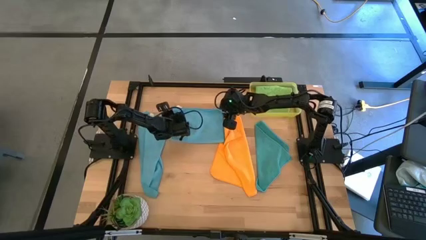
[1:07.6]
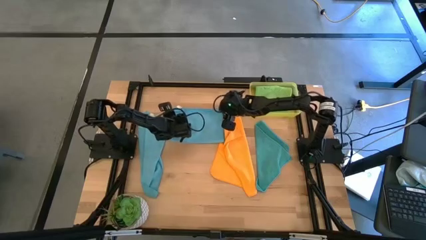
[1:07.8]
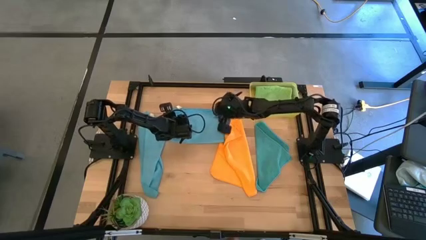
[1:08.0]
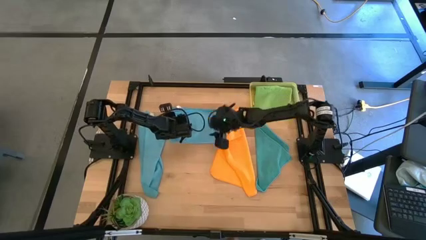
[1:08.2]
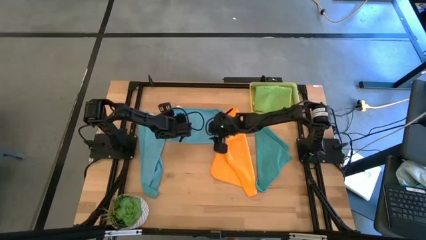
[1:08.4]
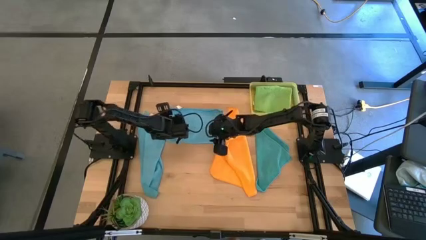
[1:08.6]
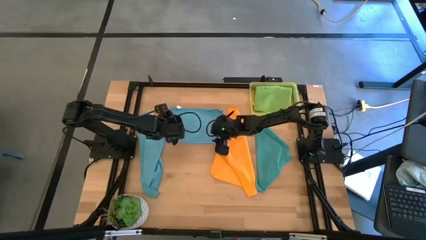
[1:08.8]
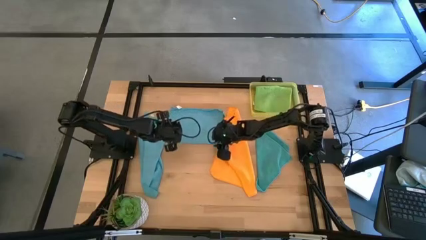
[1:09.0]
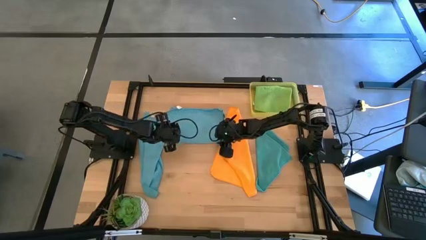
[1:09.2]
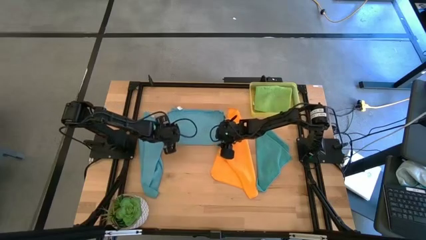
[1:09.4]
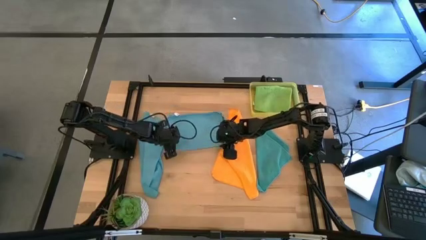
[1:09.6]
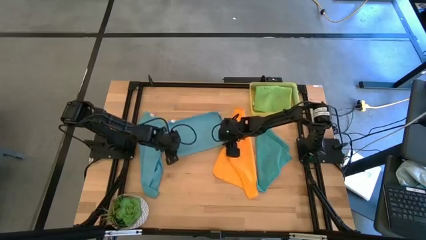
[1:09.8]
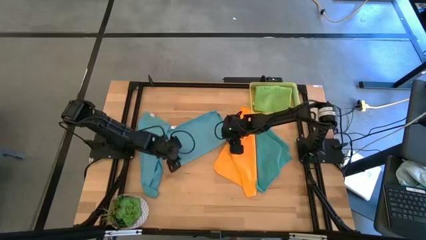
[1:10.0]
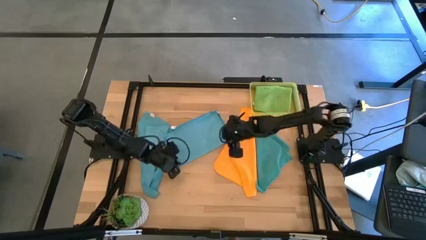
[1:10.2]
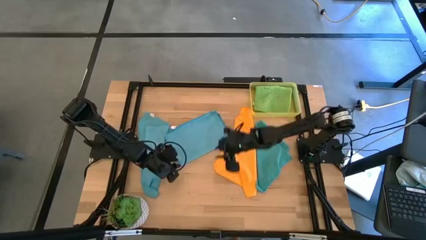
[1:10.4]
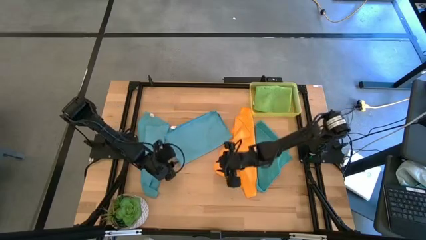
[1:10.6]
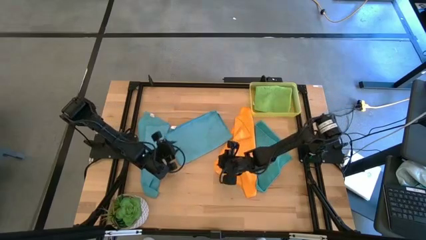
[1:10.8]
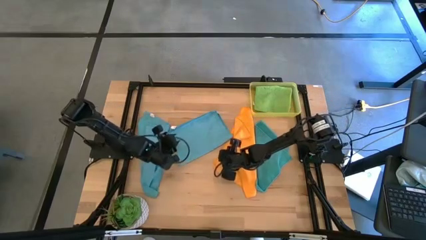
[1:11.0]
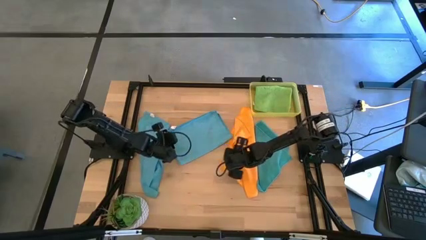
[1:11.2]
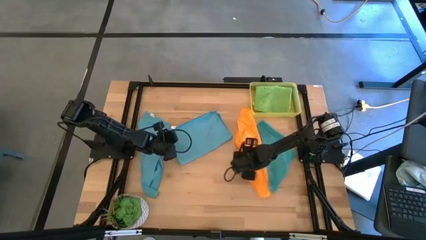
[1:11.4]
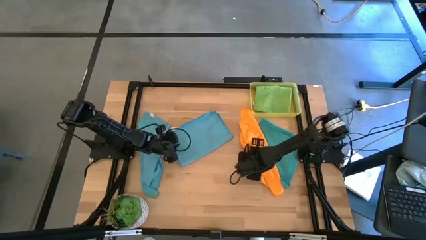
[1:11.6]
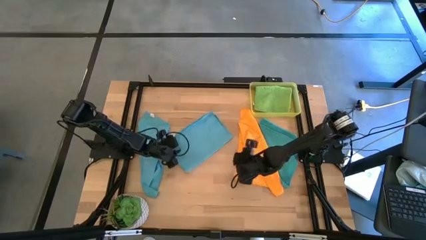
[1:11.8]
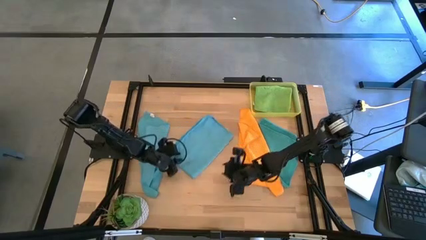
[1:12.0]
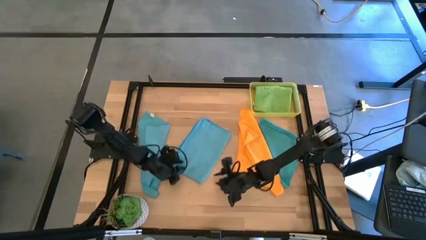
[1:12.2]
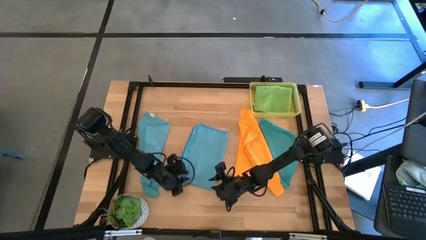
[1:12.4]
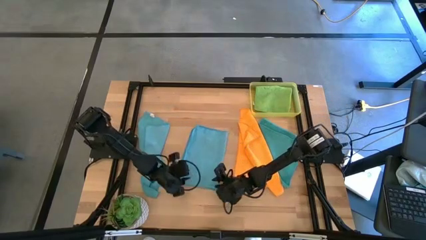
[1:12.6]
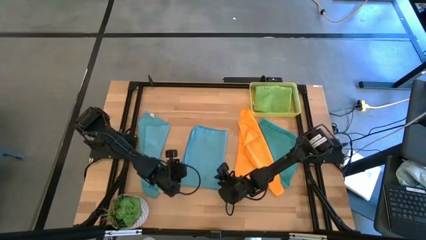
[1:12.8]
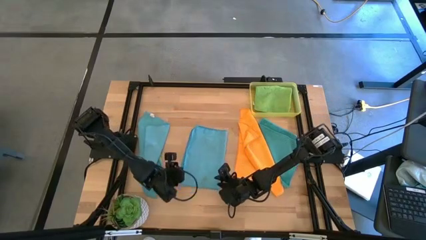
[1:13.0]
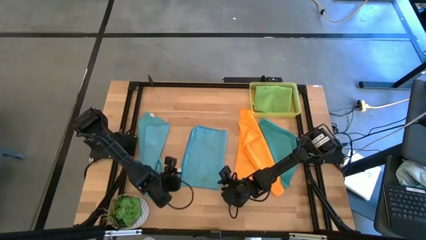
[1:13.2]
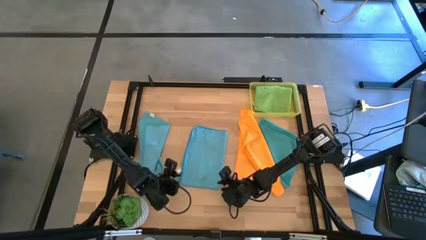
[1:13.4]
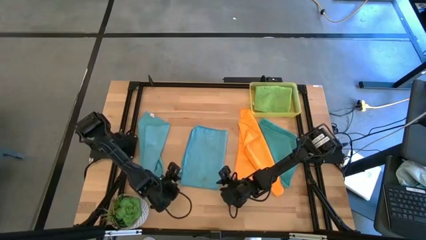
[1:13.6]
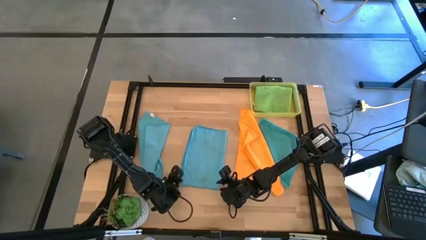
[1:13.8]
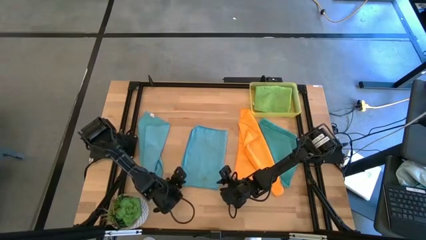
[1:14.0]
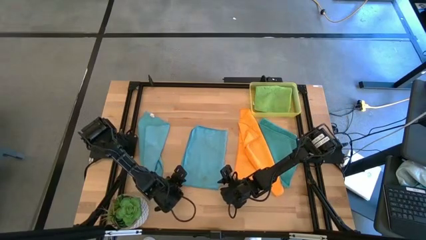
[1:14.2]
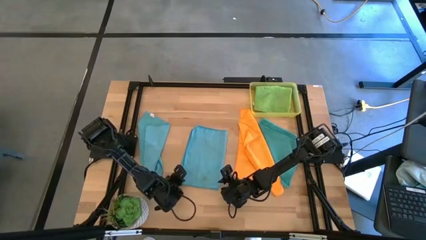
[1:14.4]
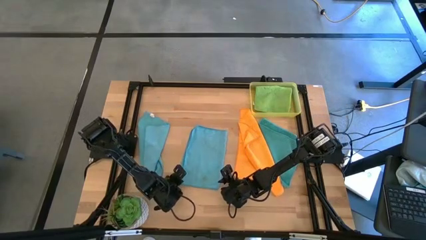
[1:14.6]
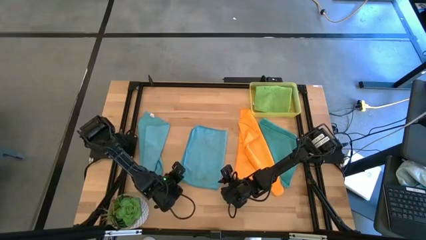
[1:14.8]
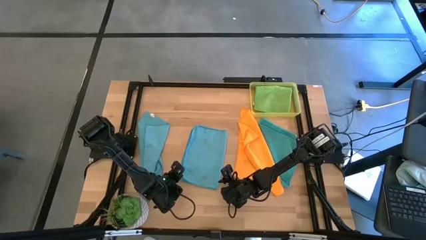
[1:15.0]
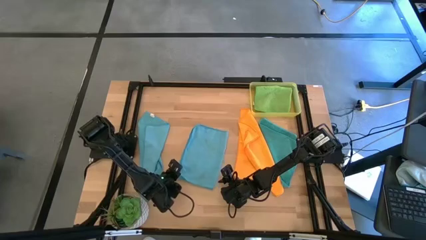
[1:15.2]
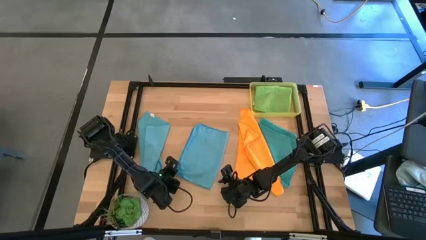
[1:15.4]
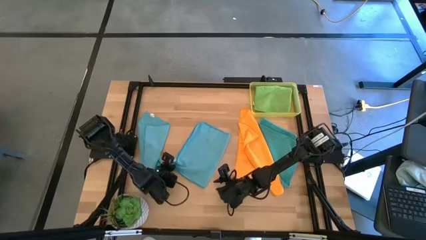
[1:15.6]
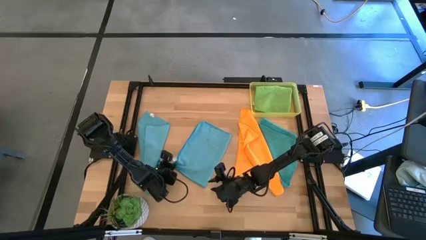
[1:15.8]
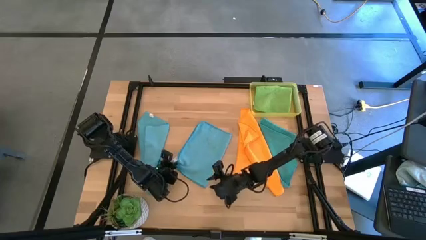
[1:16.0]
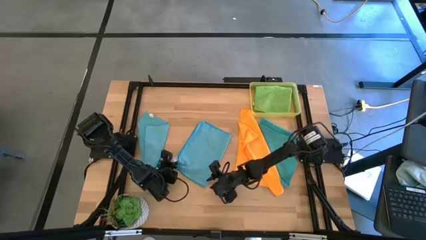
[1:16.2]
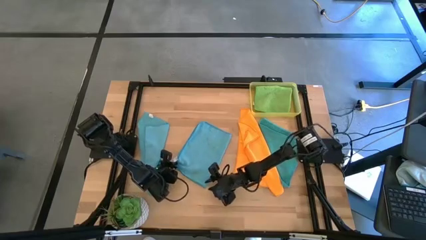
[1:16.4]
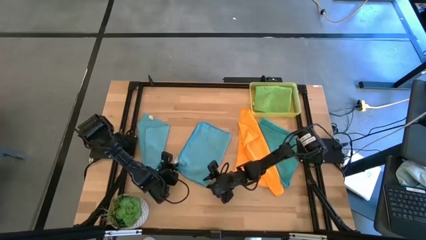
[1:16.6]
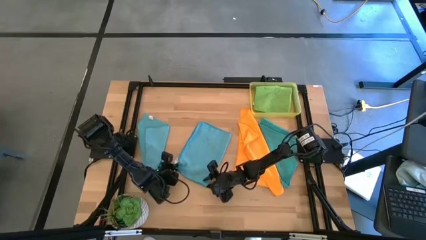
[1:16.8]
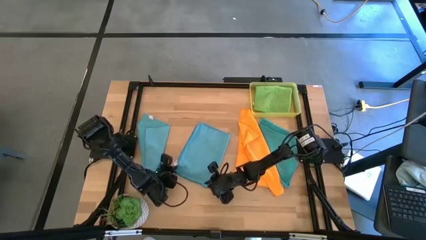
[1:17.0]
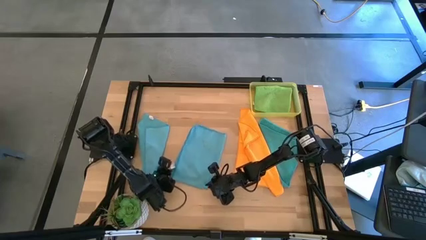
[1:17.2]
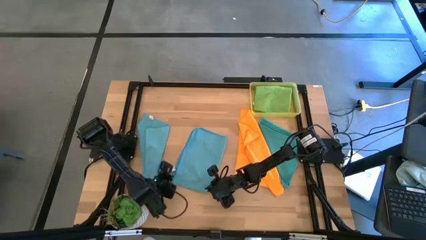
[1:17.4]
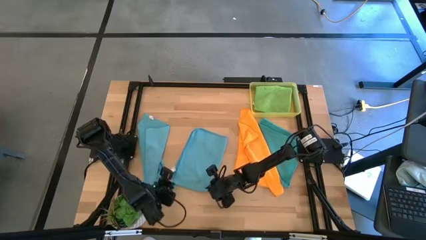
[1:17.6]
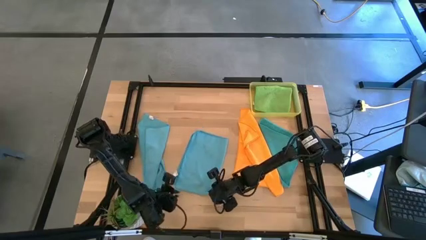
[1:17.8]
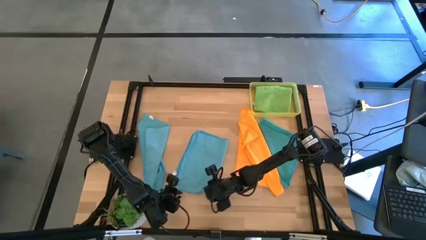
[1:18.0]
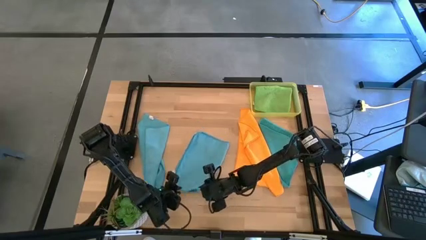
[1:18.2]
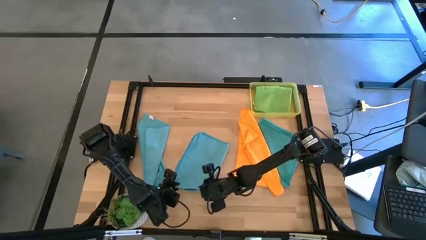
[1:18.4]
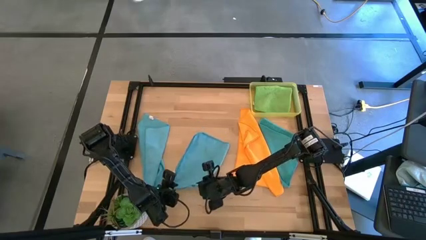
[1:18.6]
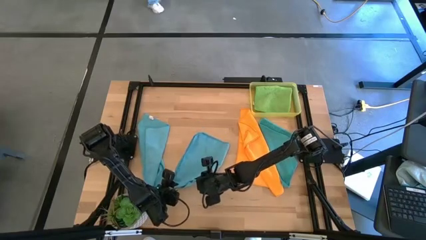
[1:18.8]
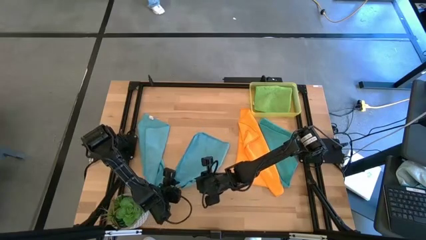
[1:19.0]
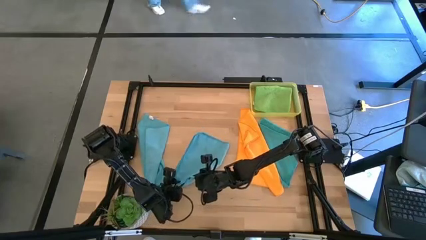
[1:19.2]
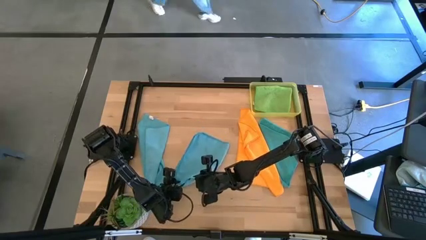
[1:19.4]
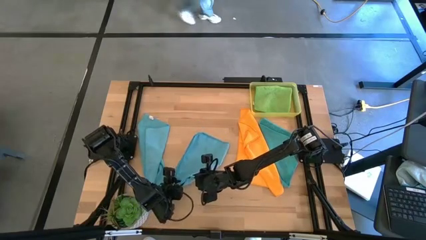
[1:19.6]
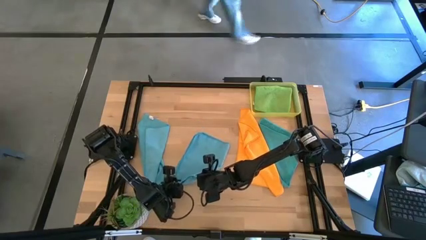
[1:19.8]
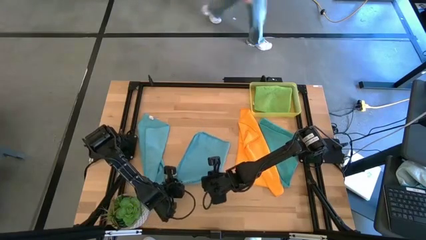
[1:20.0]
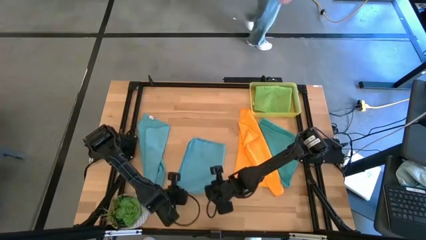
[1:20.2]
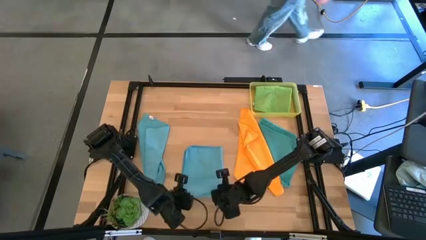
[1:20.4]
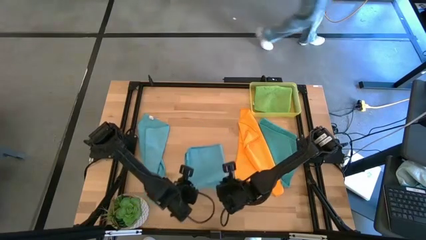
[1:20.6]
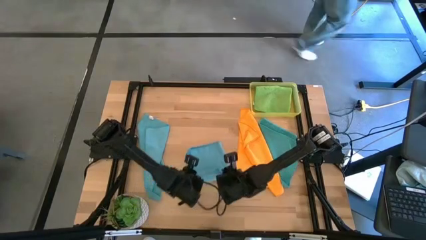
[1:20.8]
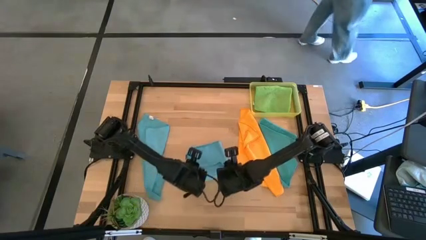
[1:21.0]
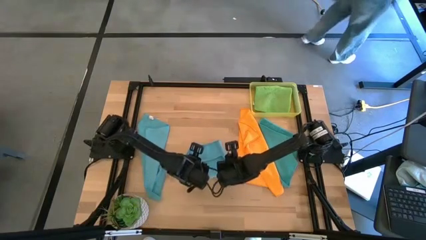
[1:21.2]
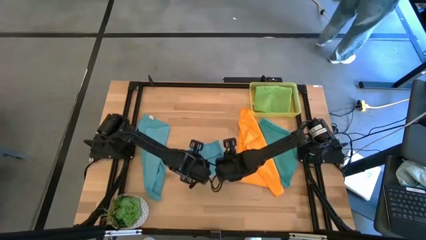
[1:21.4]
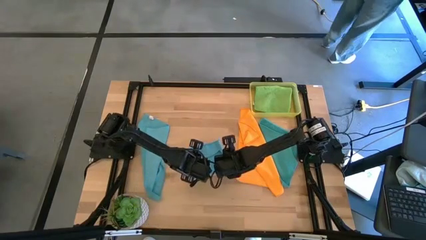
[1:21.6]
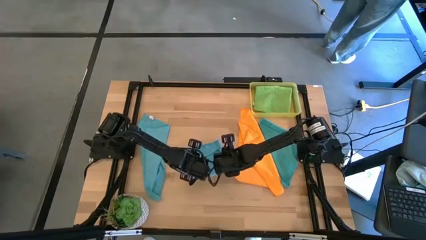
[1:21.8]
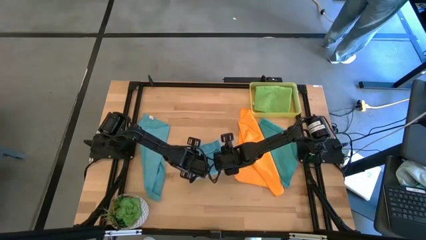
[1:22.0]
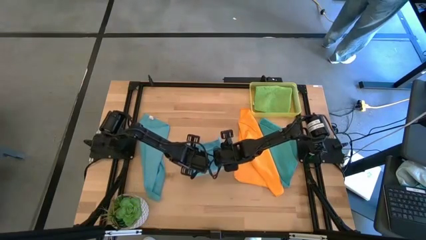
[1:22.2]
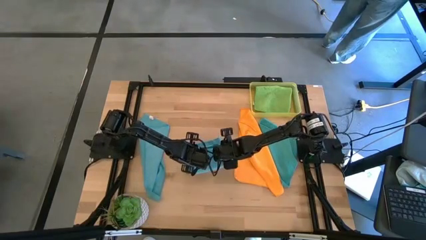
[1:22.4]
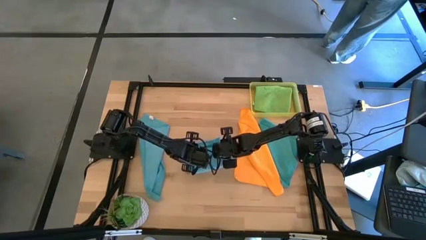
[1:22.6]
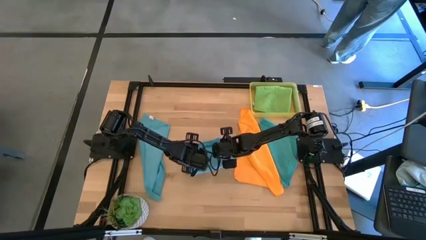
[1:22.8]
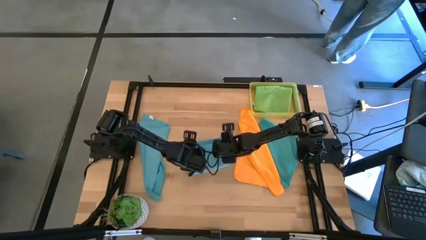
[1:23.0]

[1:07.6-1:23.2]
Task: Fold microfiber towels
Fold the middle blue microfiber cloth
